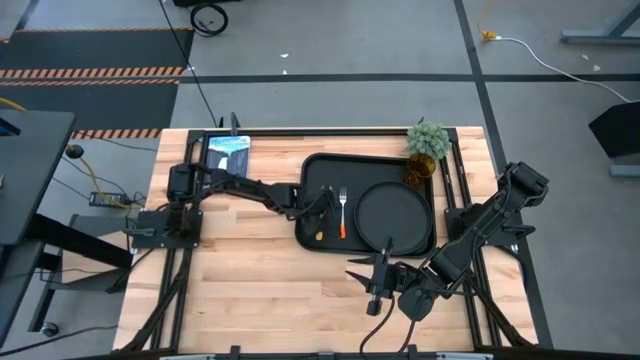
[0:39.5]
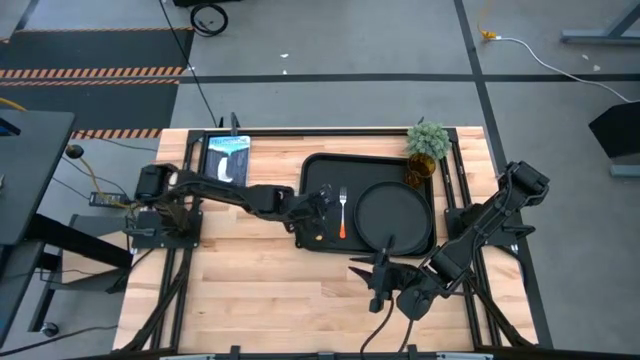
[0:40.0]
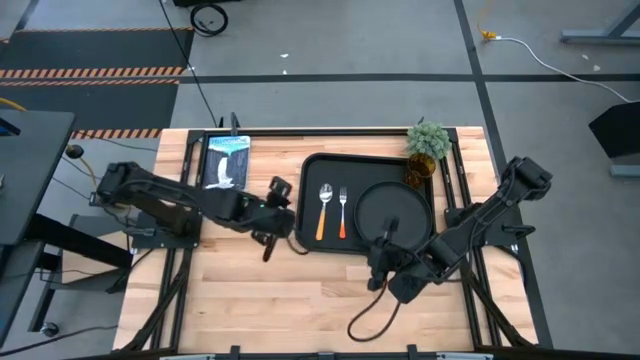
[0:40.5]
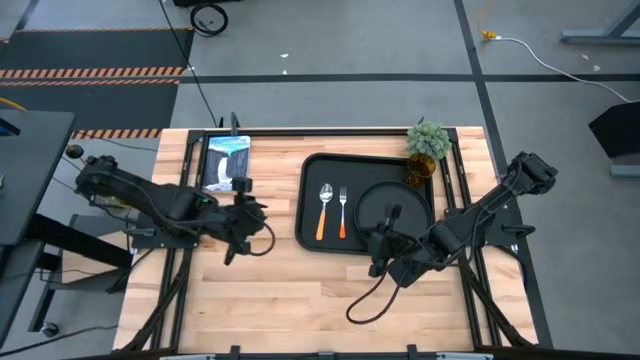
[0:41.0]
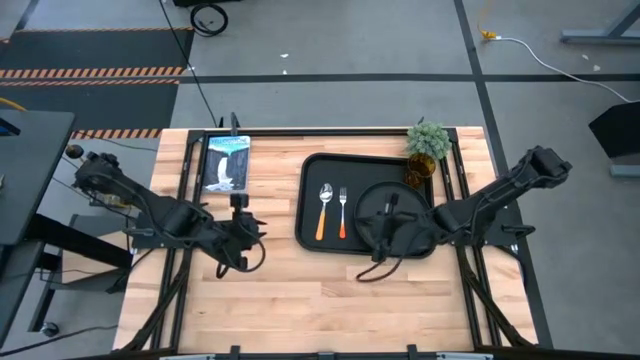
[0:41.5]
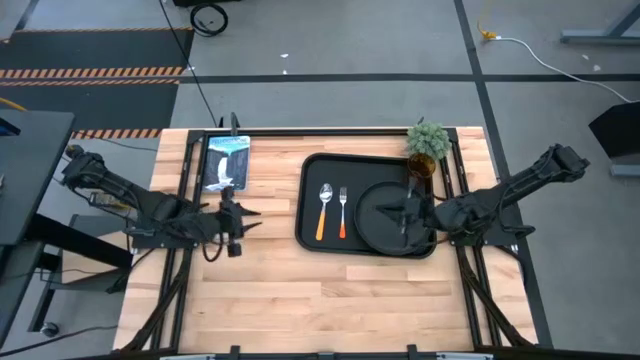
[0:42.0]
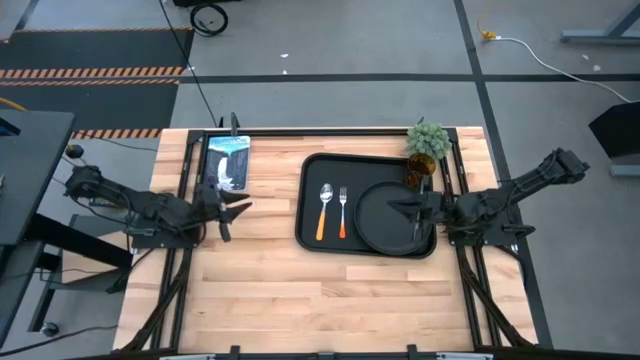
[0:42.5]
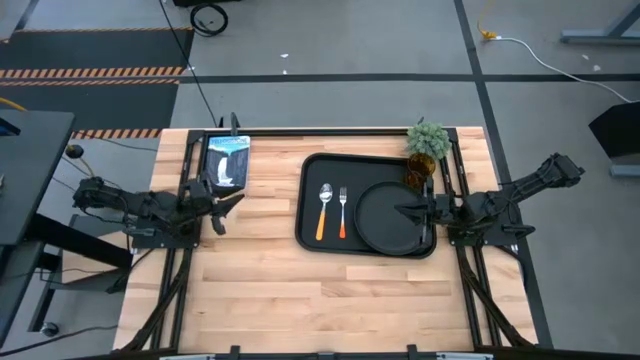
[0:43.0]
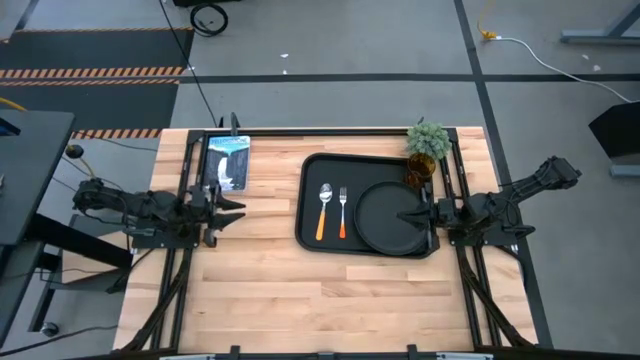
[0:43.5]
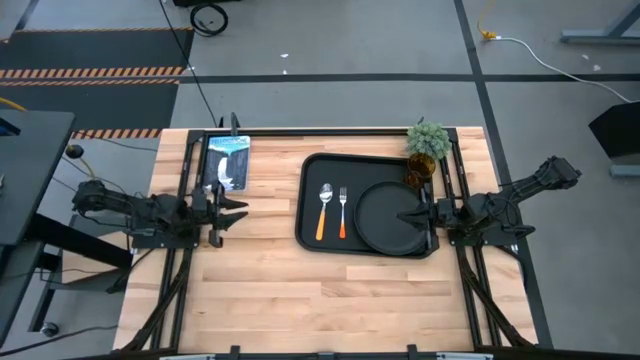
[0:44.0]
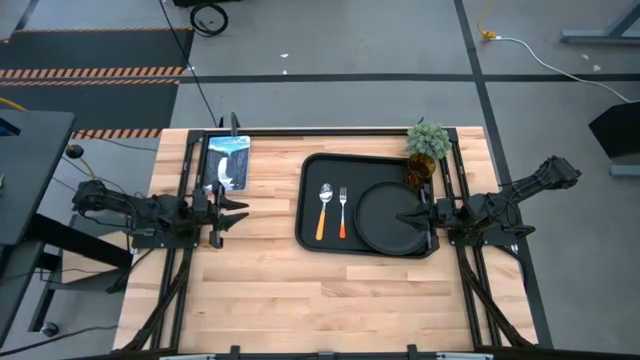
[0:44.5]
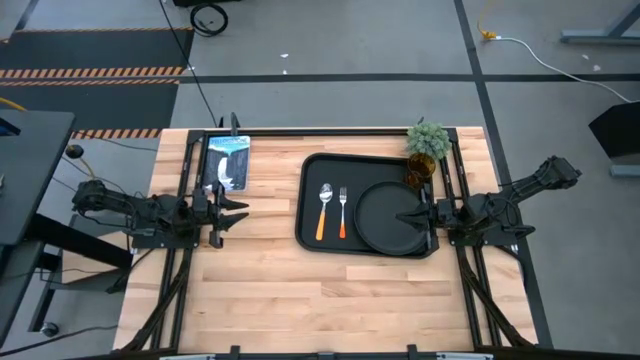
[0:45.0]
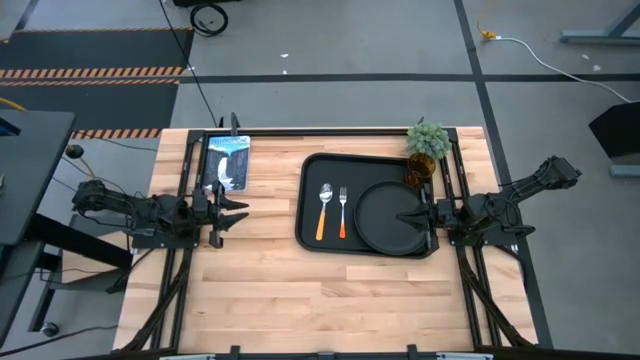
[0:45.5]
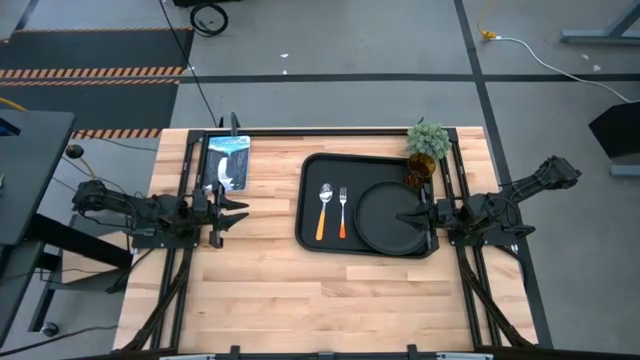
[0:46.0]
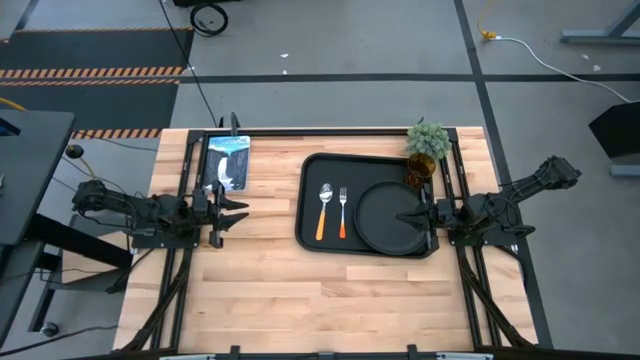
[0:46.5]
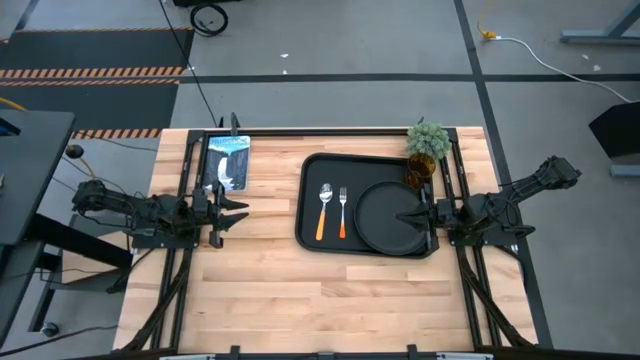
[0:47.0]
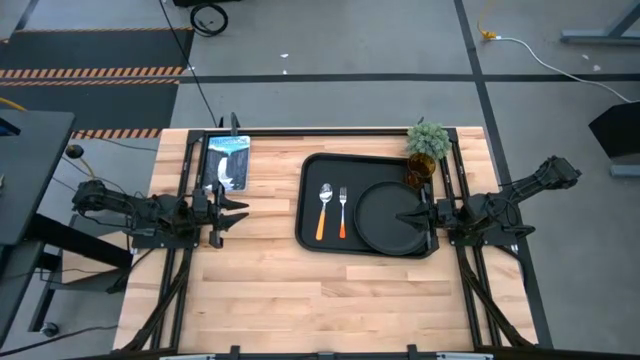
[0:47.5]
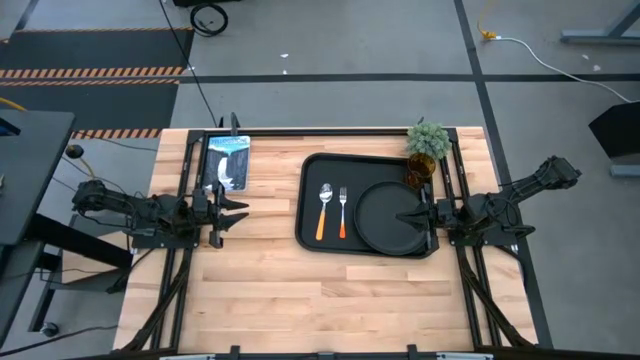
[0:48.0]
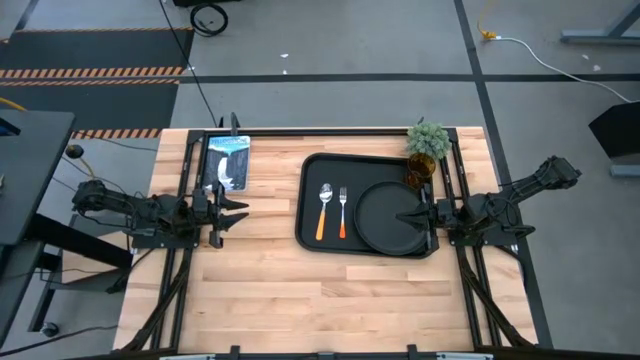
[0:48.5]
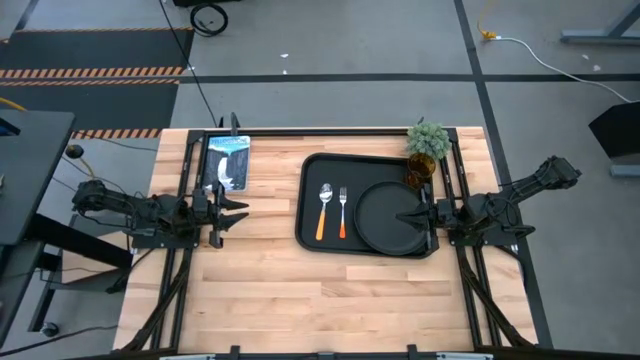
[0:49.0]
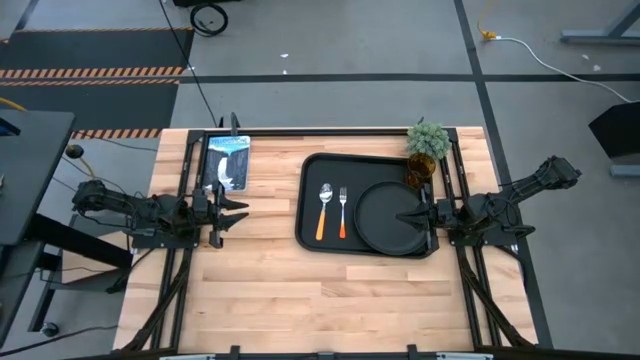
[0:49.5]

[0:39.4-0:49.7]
Task: Pick and place plate/cup/fork/spoon on tray
Return to Home Position

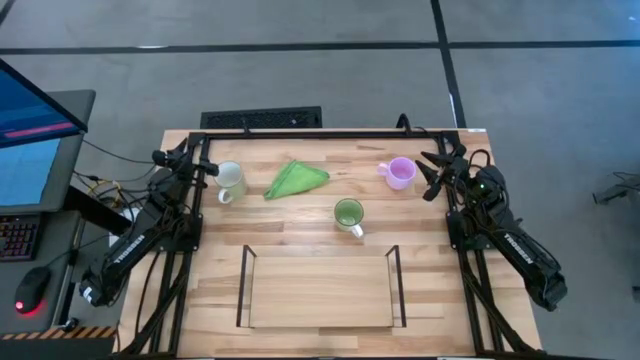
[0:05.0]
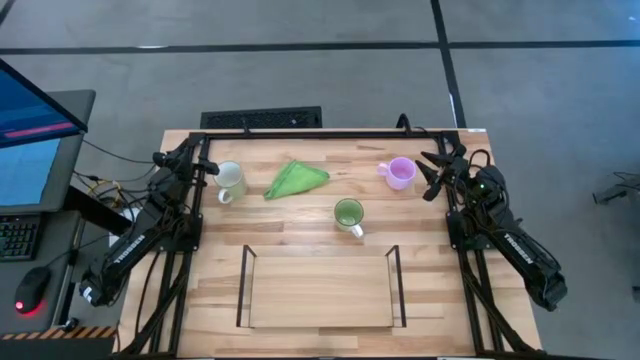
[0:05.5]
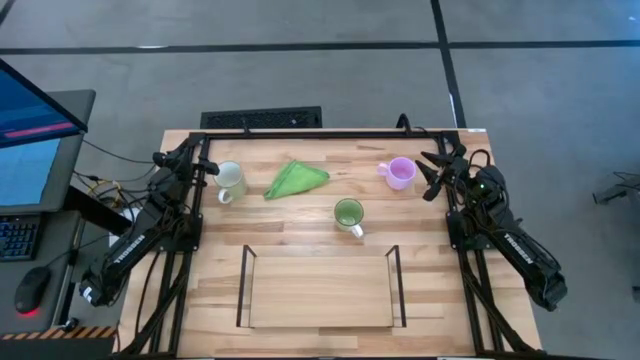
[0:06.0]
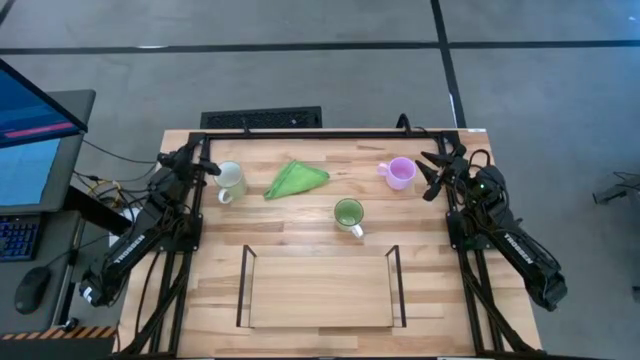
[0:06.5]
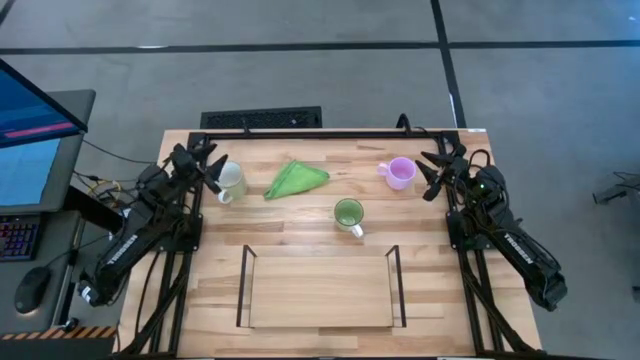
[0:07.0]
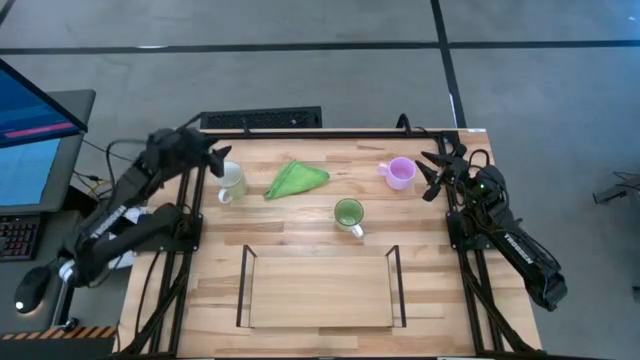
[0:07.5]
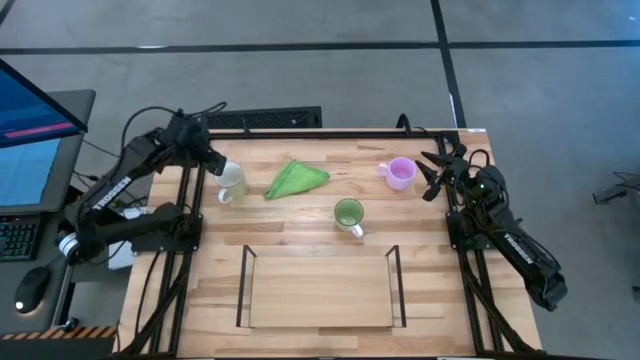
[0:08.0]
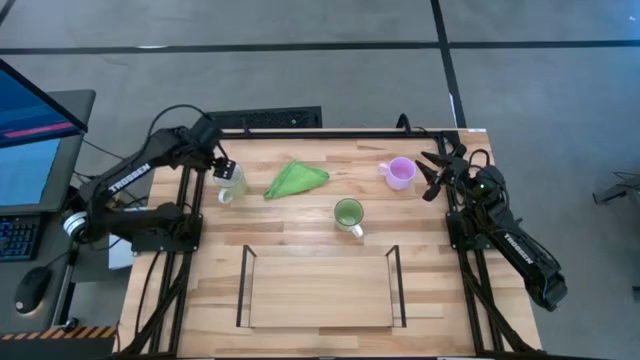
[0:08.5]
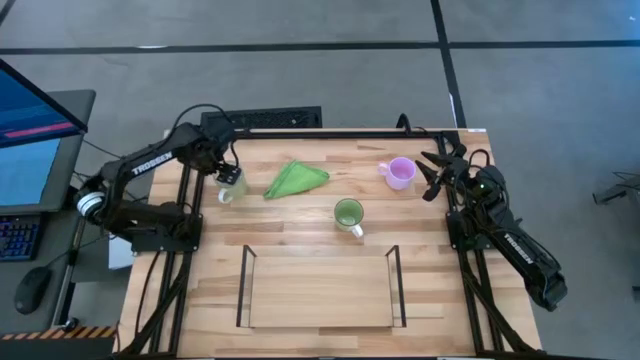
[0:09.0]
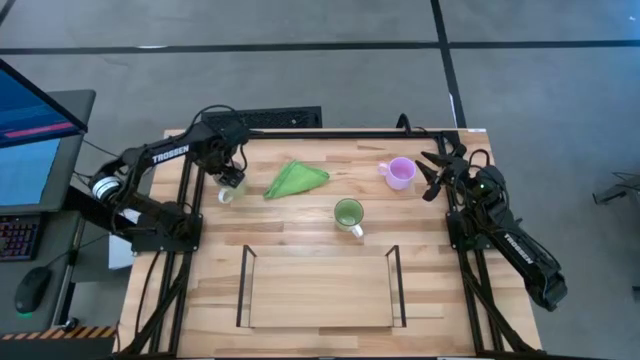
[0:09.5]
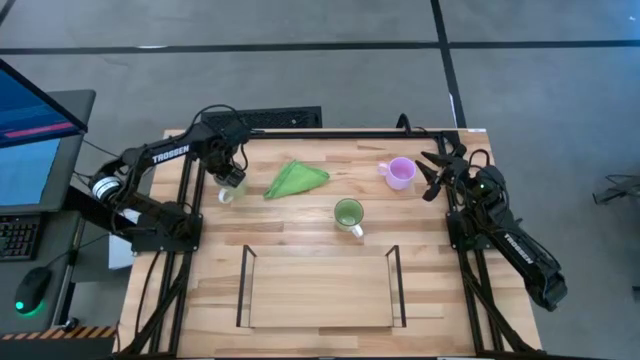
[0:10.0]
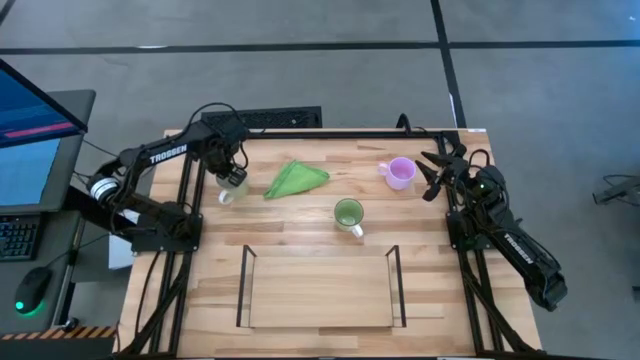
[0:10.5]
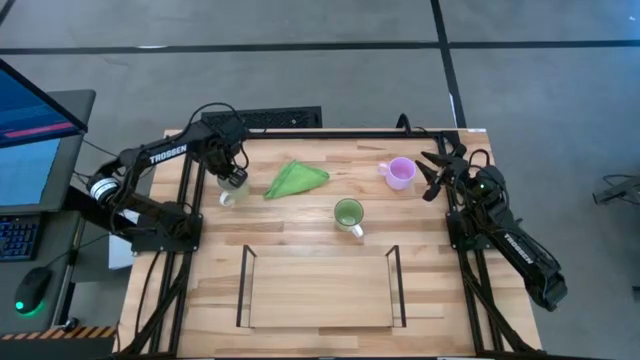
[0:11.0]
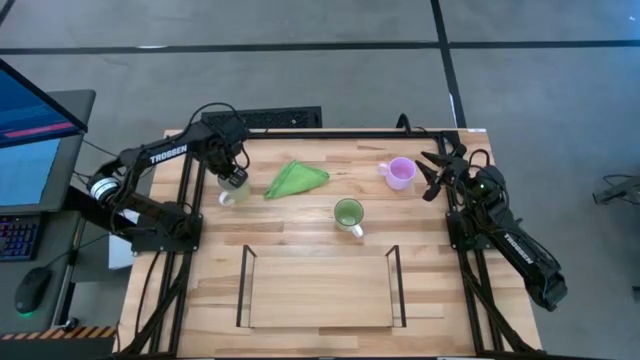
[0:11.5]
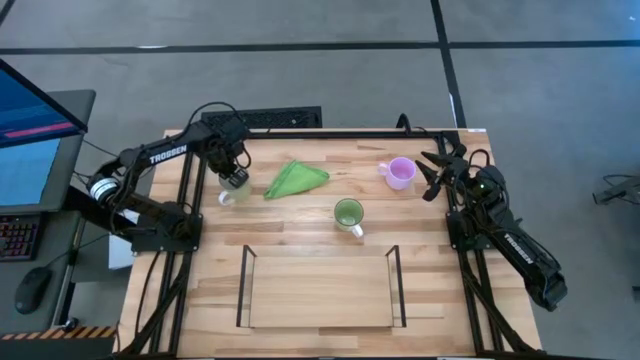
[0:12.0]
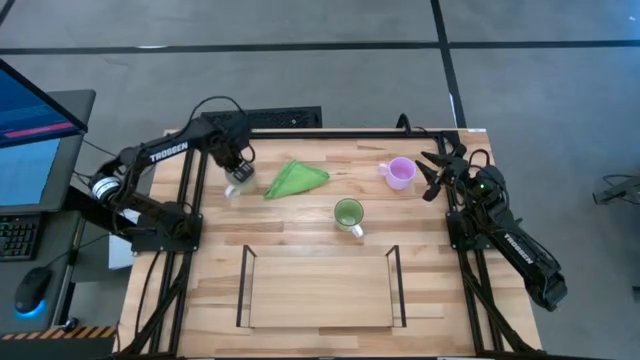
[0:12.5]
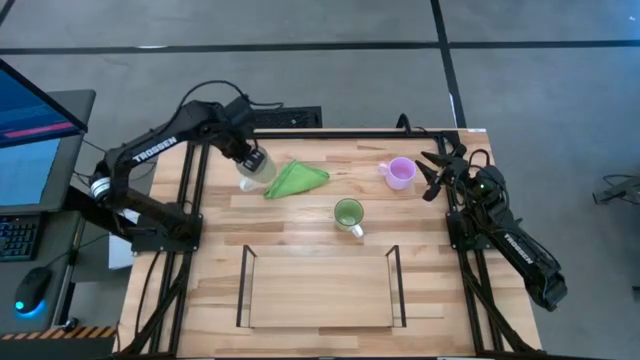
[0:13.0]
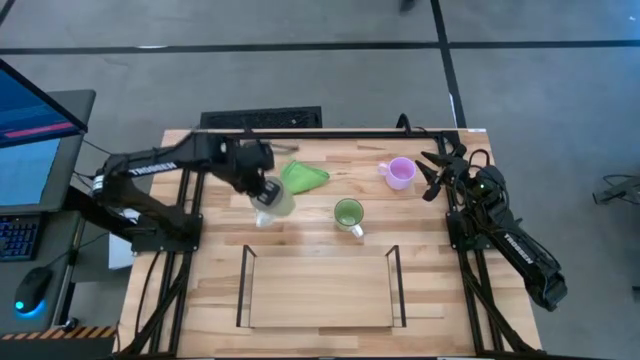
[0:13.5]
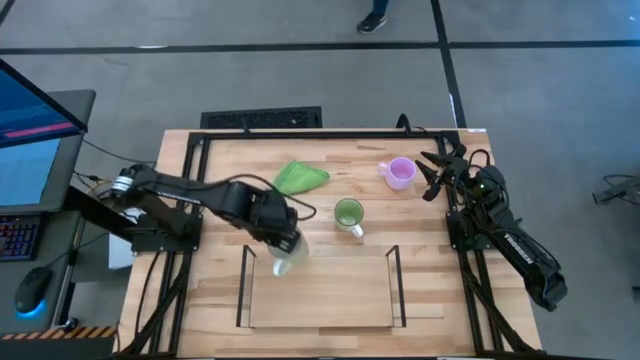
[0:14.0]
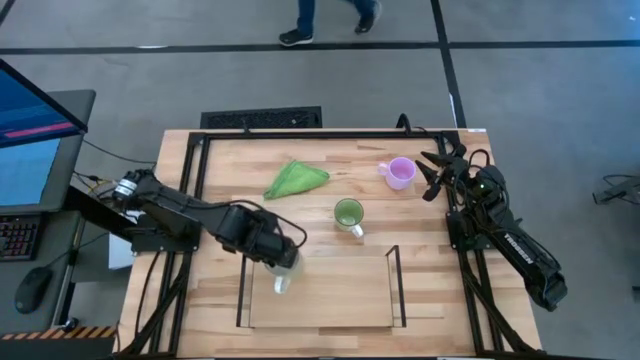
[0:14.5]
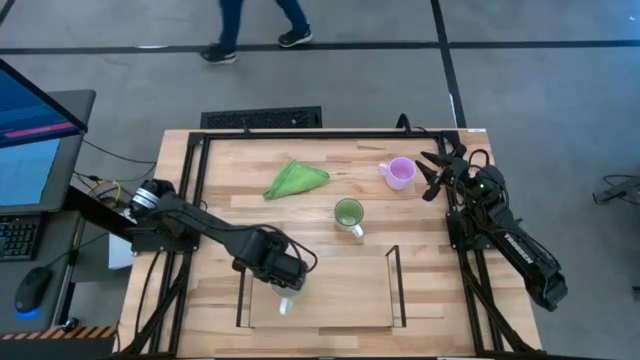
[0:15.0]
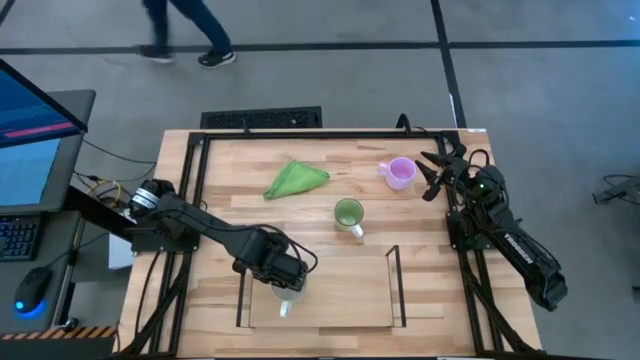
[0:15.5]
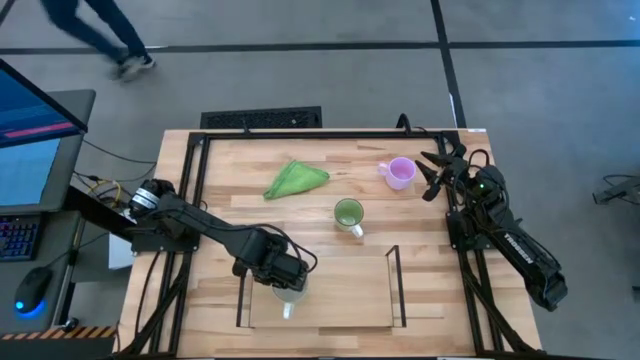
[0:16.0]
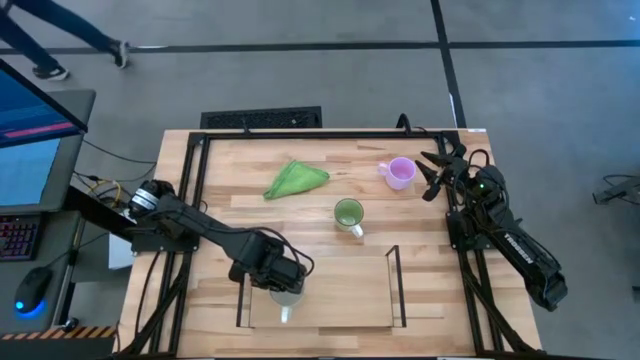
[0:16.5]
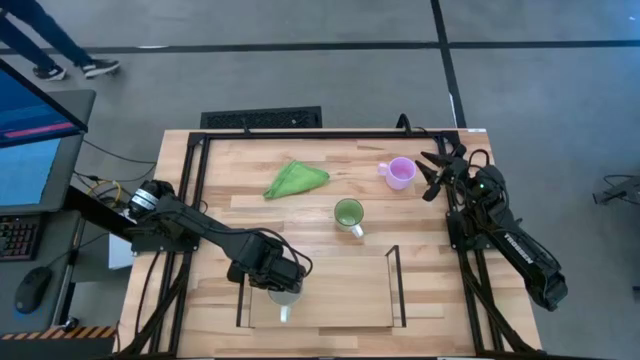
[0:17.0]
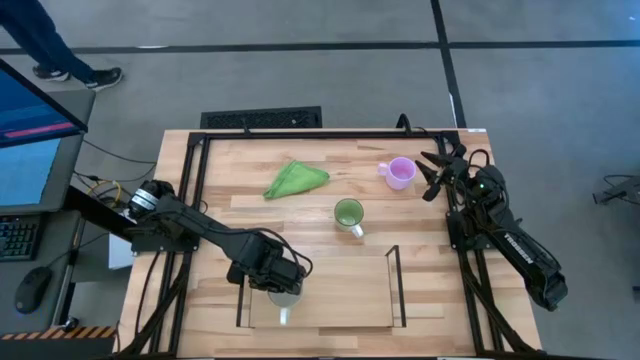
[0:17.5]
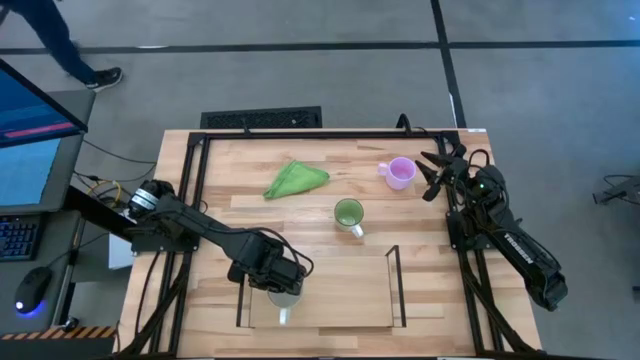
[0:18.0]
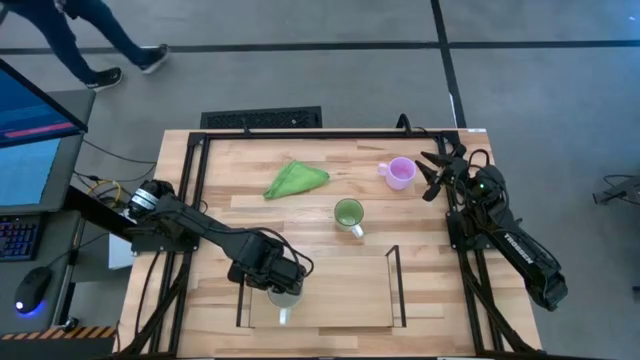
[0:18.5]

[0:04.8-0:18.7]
Task: Stack small to large cups/mugs on shelf
Put the light green mug on the shelf
